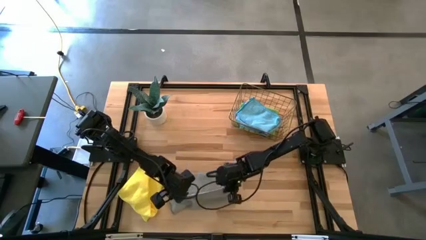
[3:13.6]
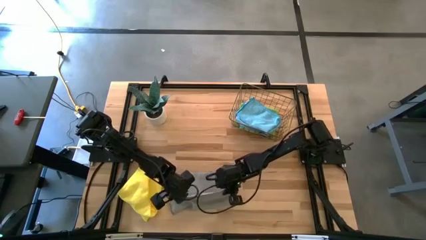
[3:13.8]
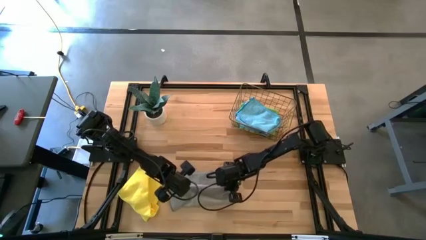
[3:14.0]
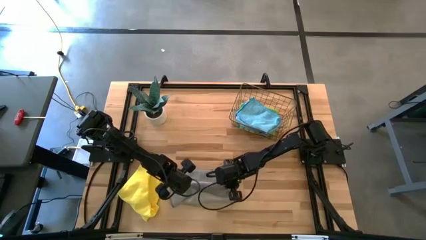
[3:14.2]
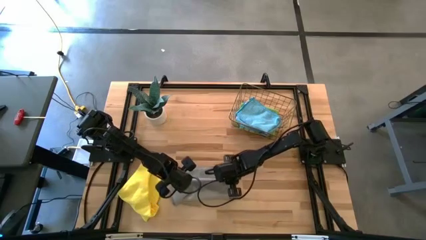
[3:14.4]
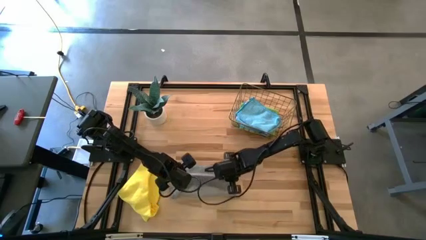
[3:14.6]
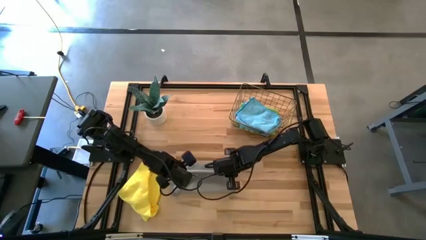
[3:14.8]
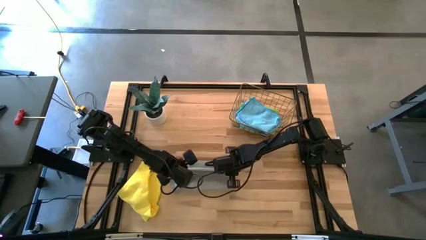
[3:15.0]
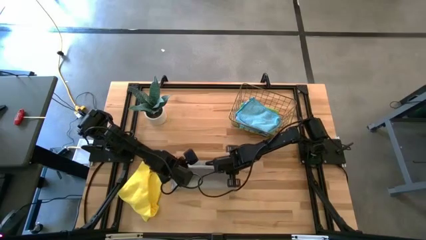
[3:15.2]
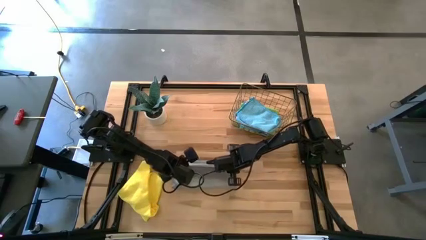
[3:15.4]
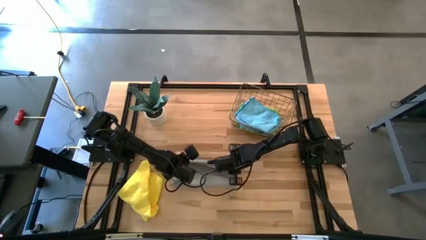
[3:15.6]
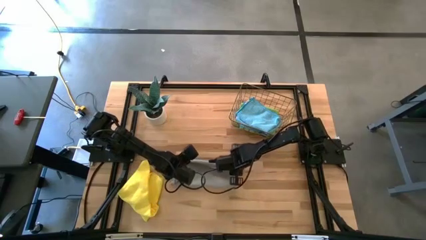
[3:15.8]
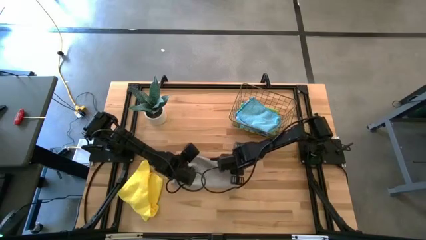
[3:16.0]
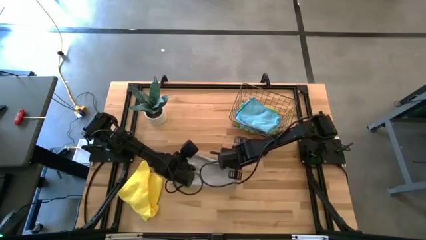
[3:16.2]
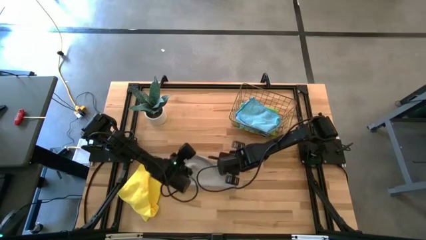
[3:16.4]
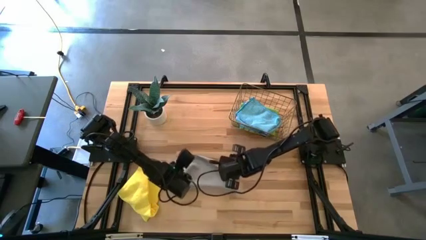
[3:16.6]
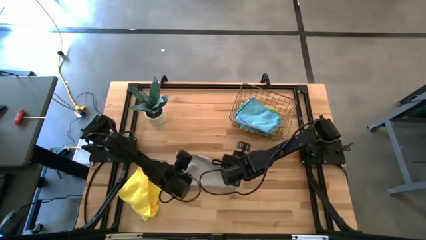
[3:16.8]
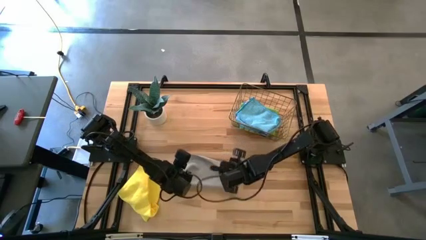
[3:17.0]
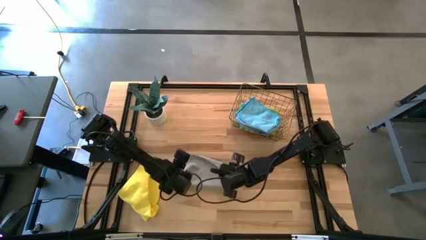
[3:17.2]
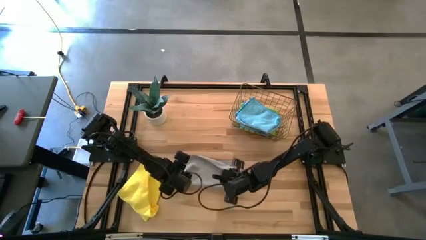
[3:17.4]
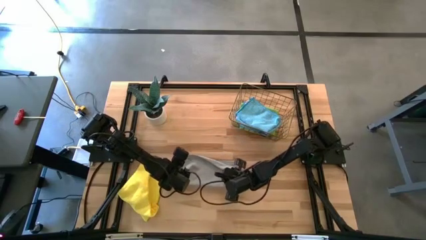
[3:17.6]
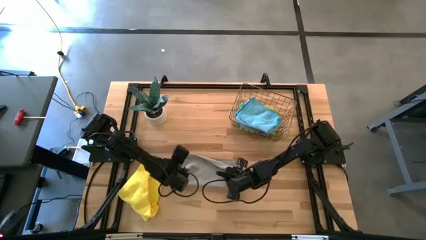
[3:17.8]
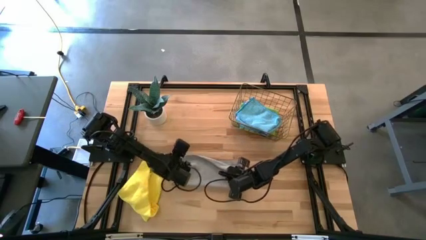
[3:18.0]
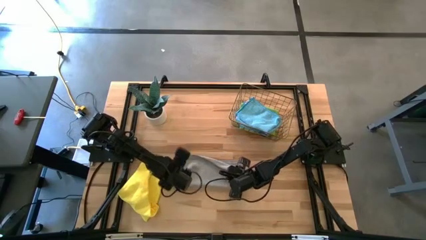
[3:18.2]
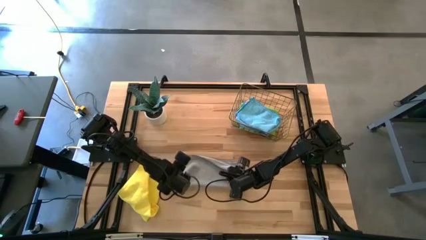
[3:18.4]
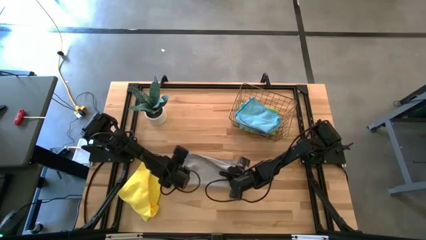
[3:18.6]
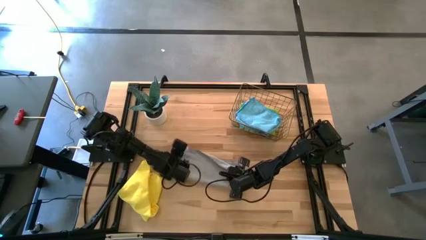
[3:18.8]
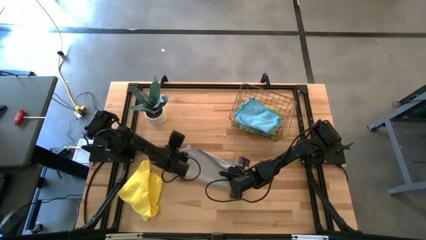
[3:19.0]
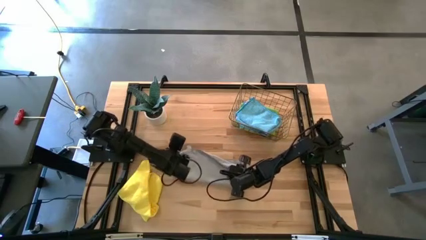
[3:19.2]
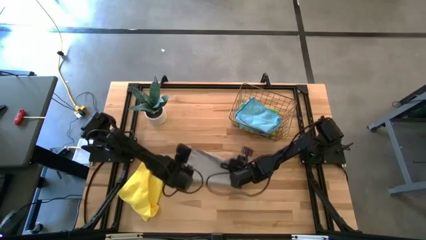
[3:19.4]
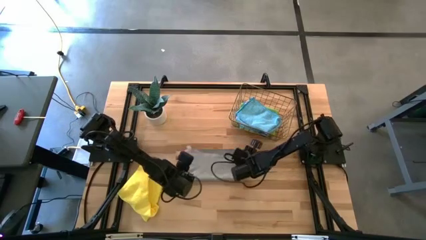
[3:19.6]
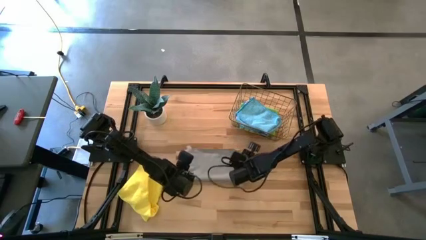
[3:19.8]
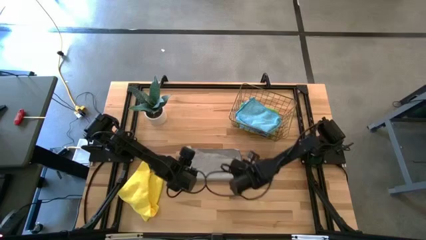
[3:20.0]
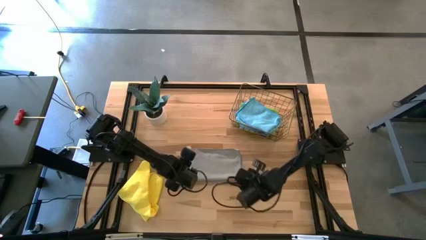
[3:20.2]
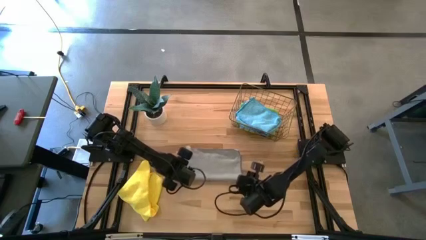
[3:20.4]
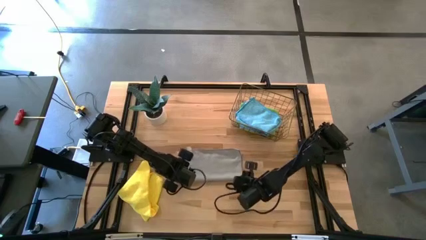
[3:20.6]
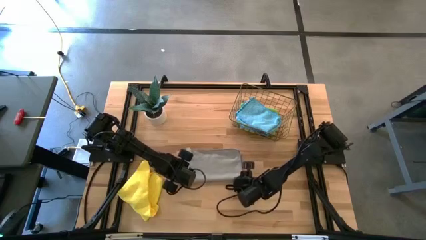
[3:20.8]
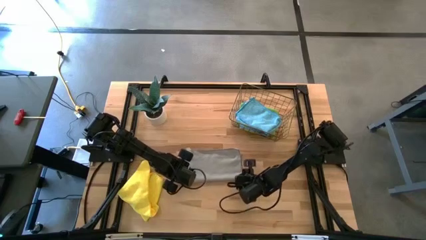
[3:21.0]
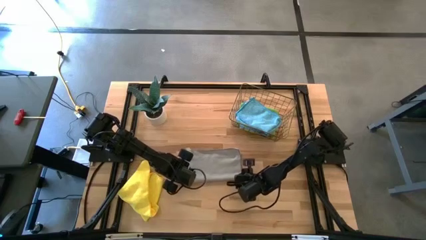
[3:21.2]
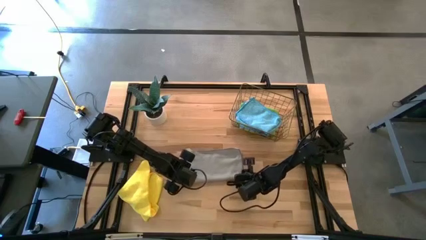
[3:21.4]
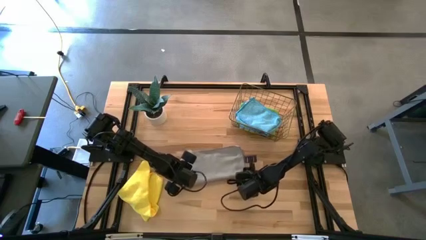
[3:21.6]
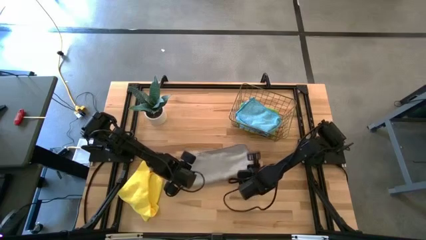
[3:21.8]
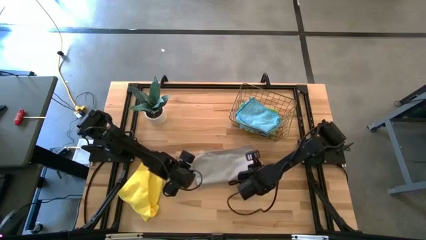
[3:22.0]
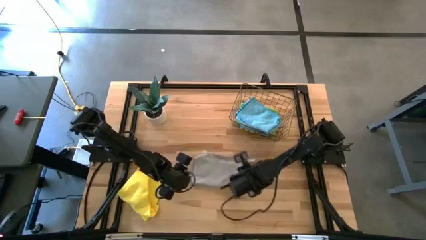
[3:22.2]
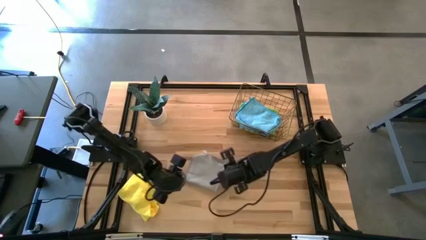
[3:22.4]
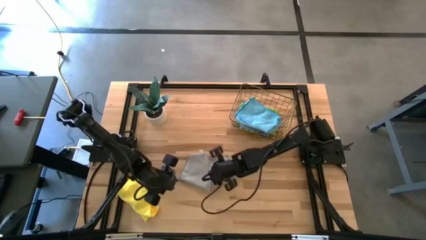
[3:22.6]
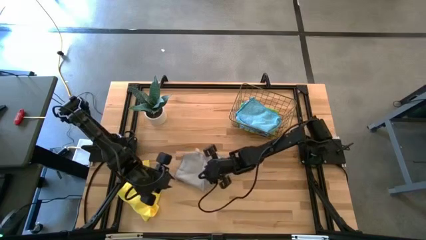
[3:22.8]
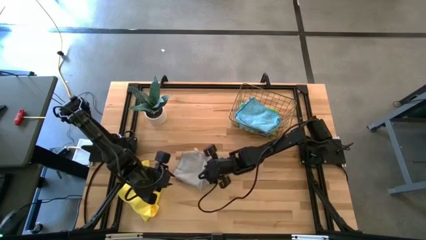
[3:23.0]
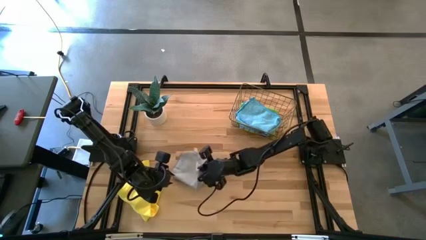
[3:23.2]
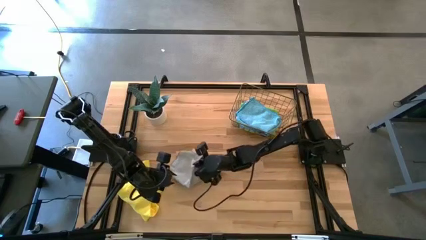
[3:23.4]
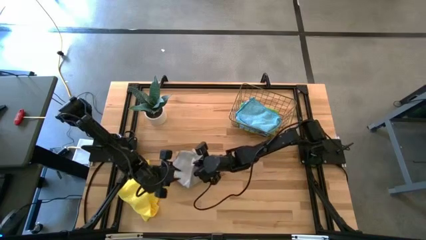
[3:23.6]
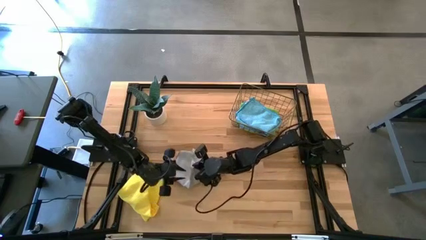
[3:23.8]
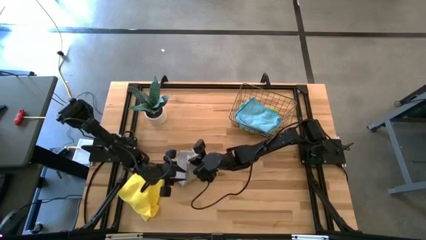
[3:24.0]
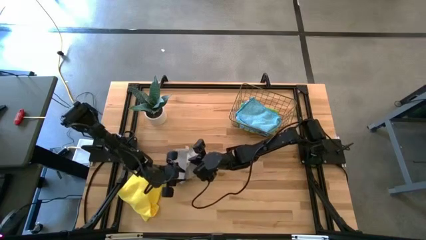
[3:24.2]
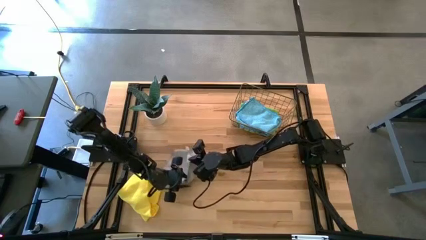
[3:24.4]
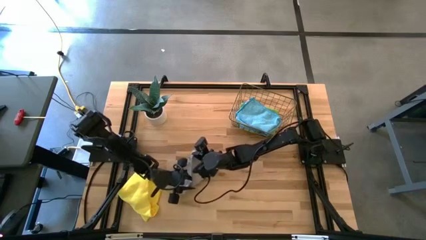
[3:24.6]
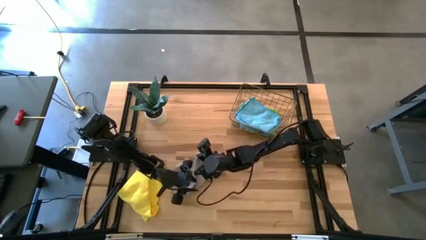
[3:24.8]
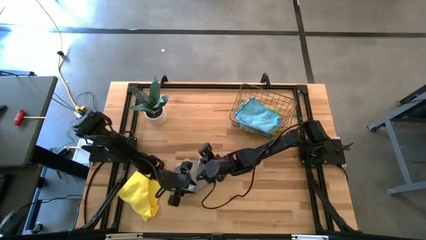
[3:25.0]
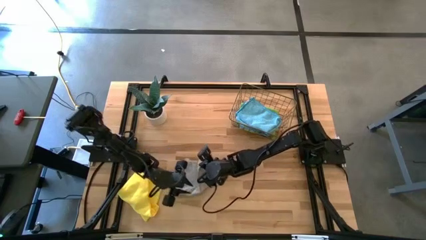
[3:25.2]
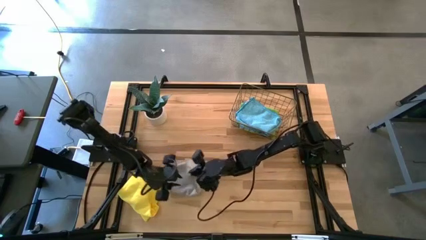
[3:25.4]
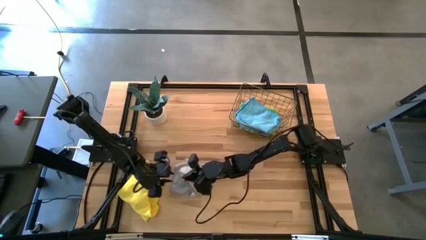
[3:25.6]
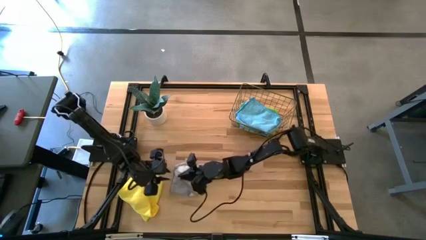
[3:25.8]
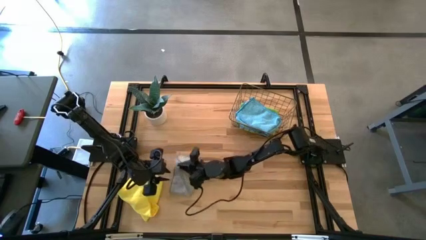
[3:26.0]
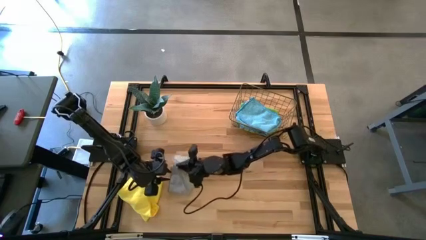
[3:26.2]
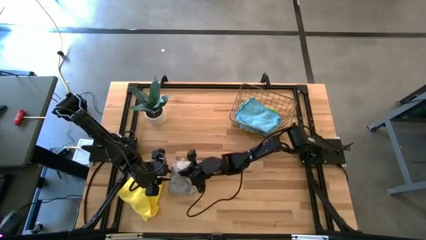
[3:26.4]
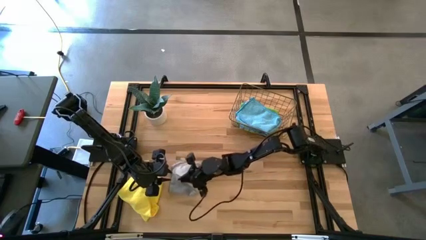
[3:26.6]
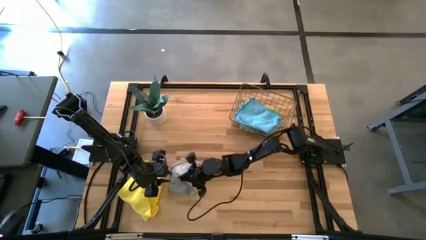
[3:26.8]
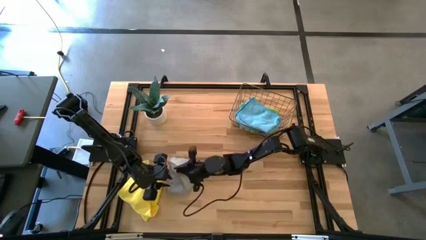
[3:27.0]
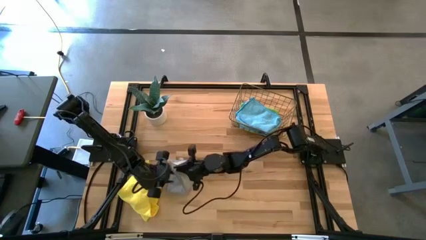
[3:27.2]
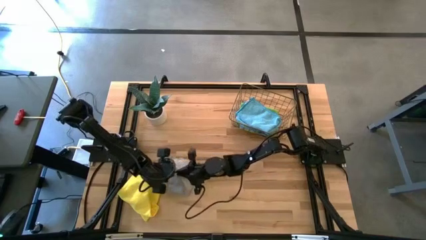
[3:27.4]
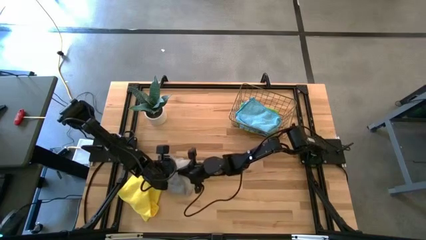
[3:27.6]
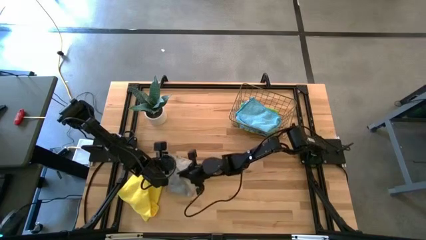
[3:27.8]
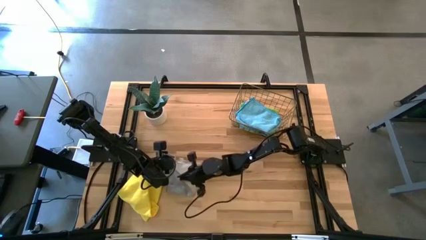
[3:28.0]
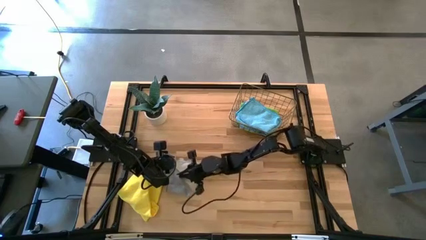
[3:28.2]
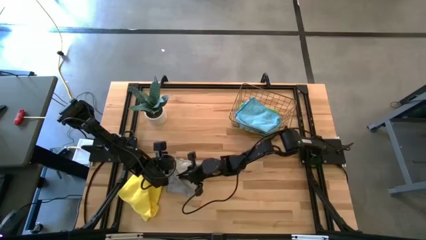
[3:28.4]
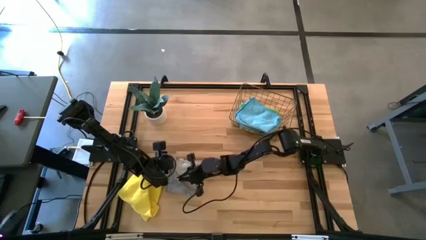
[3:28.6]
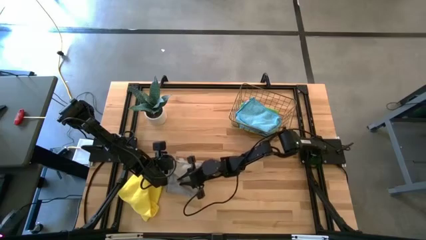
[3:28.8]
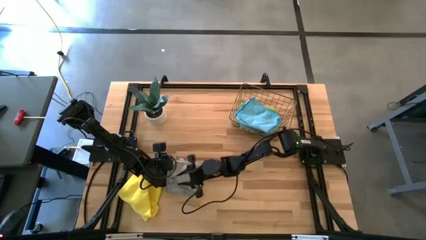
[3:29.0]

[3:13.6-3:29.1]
Task: Fold microfiber towels
Fold the gray microfiber towel
